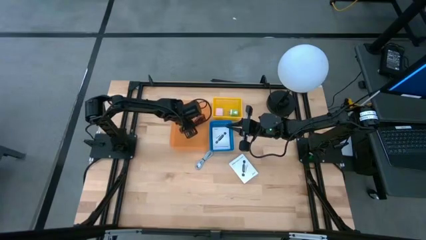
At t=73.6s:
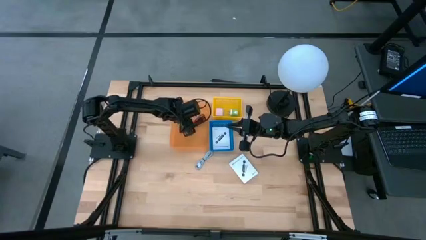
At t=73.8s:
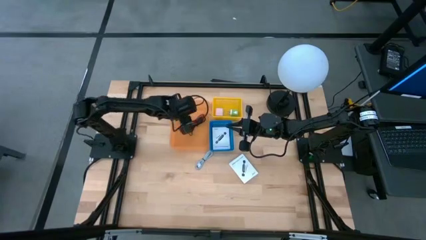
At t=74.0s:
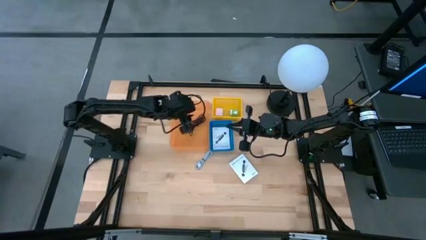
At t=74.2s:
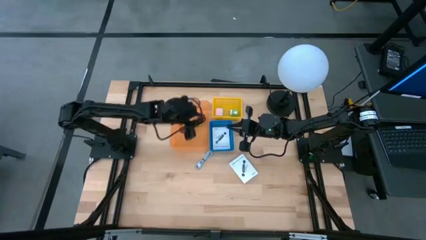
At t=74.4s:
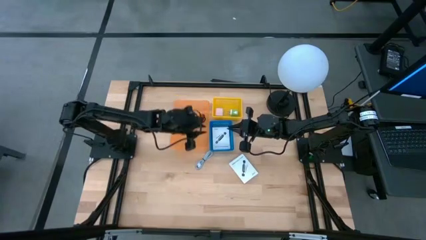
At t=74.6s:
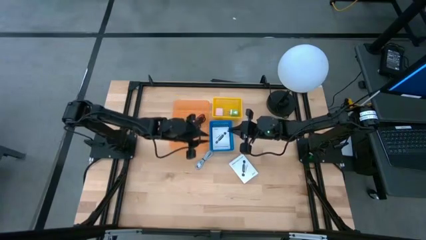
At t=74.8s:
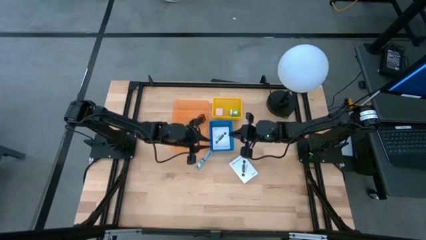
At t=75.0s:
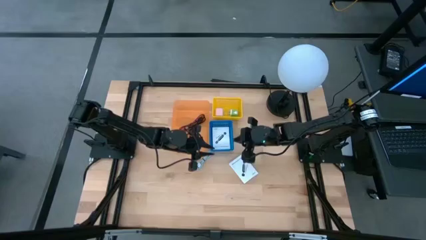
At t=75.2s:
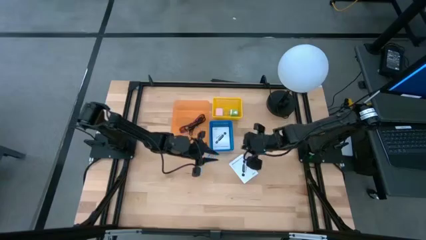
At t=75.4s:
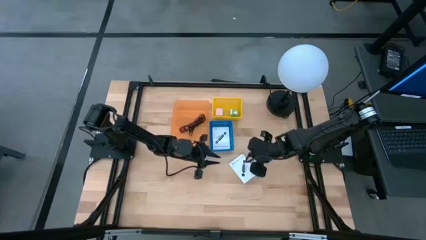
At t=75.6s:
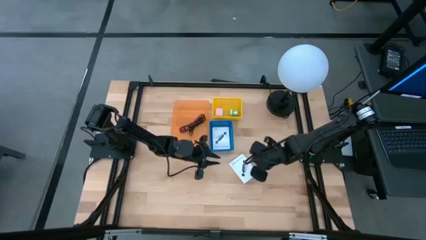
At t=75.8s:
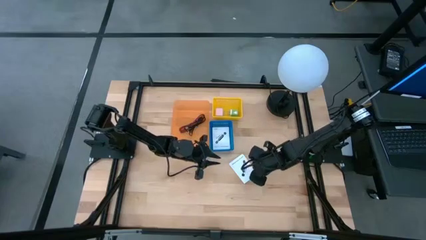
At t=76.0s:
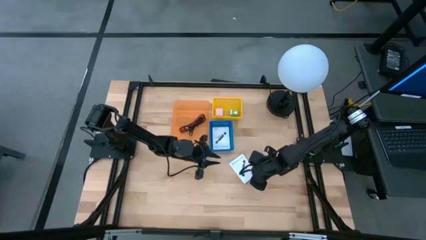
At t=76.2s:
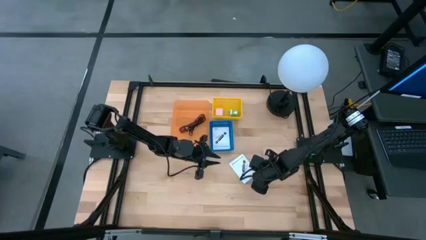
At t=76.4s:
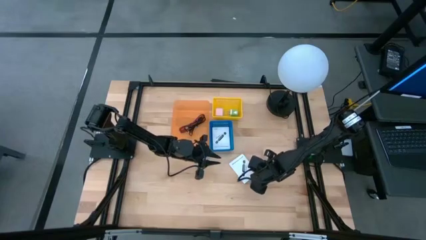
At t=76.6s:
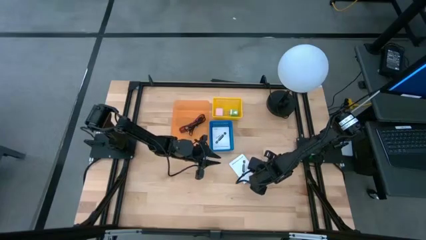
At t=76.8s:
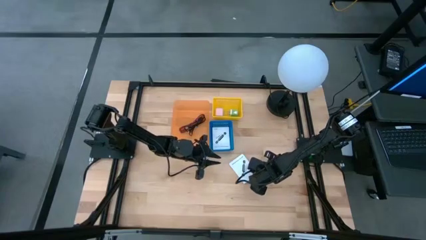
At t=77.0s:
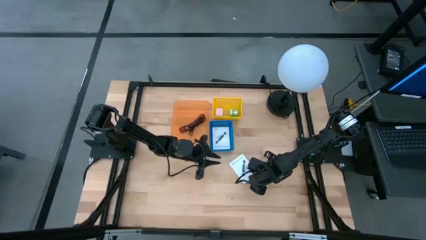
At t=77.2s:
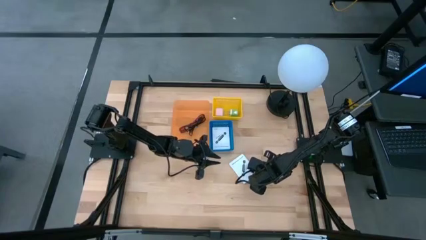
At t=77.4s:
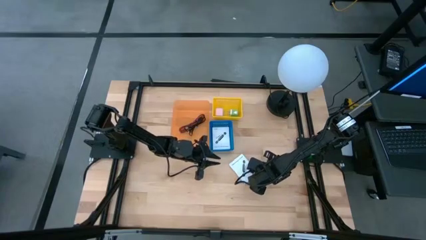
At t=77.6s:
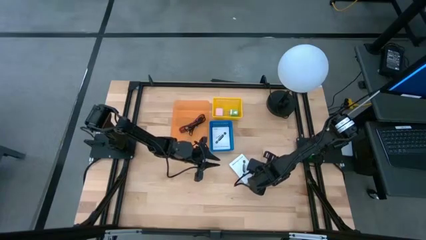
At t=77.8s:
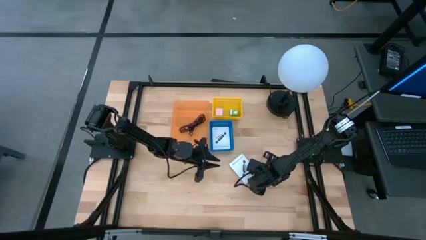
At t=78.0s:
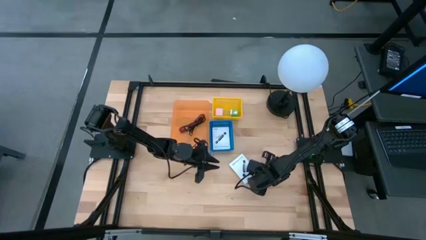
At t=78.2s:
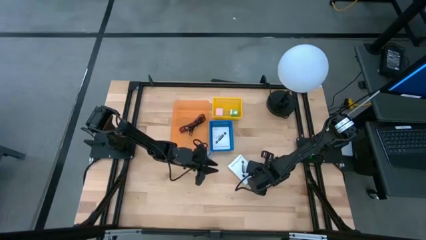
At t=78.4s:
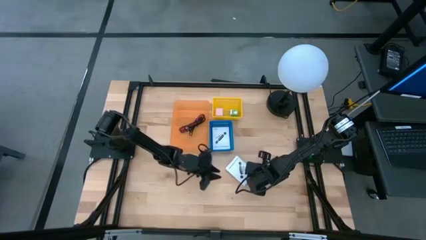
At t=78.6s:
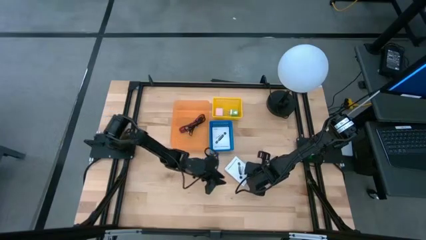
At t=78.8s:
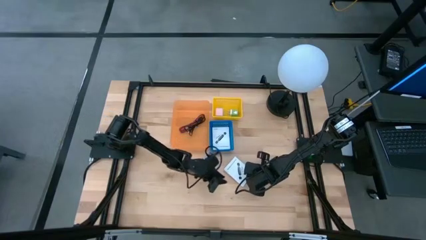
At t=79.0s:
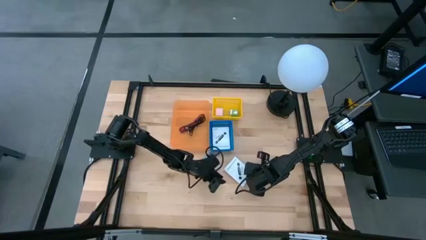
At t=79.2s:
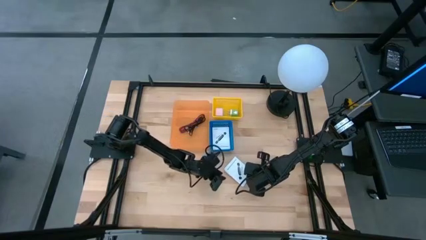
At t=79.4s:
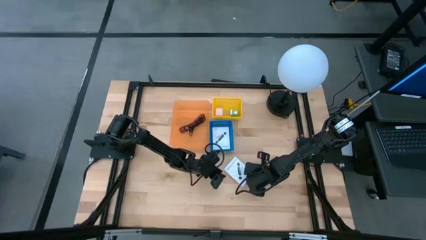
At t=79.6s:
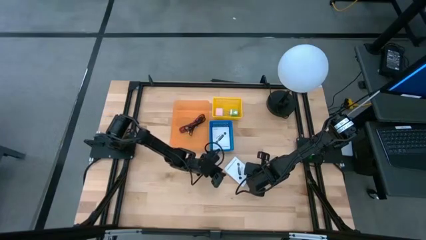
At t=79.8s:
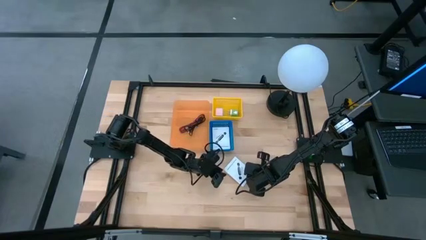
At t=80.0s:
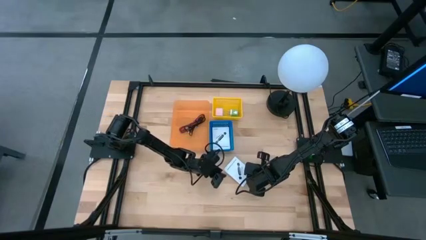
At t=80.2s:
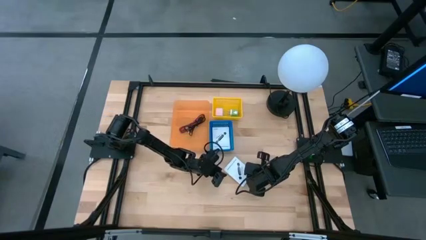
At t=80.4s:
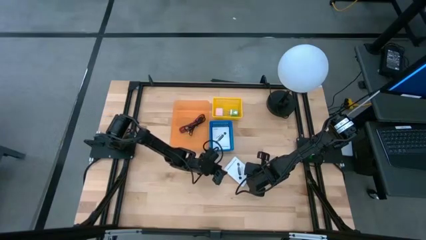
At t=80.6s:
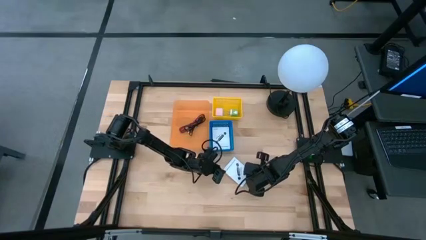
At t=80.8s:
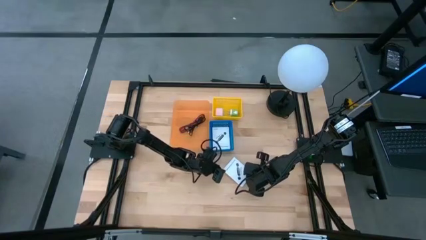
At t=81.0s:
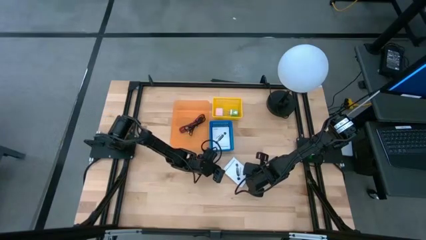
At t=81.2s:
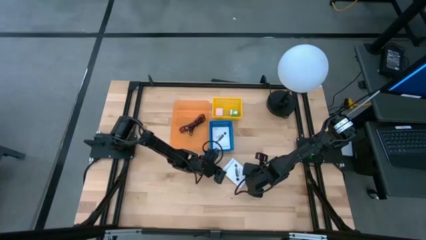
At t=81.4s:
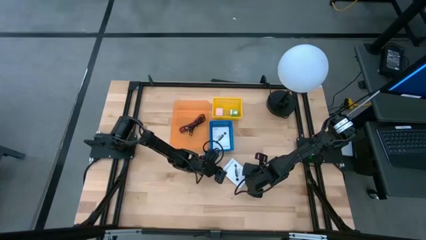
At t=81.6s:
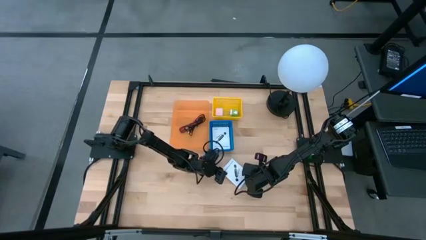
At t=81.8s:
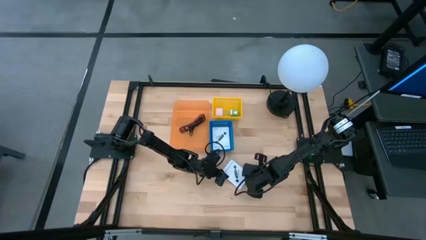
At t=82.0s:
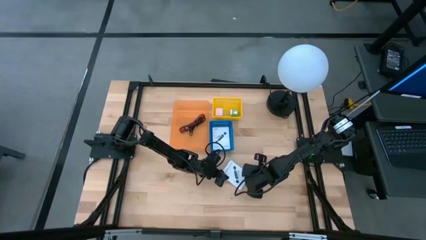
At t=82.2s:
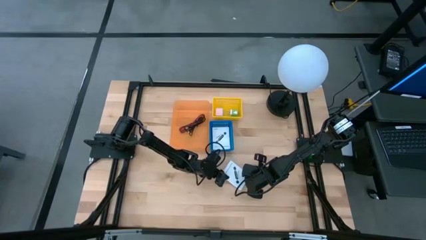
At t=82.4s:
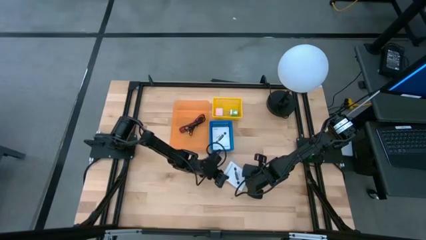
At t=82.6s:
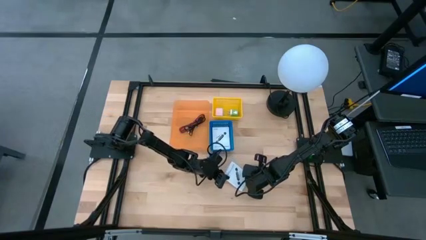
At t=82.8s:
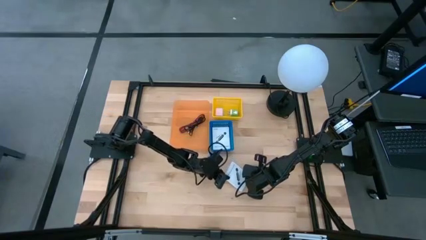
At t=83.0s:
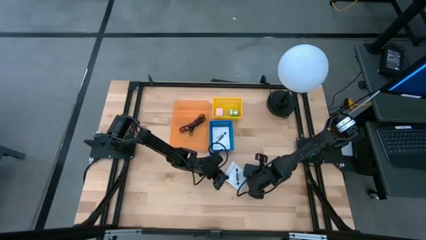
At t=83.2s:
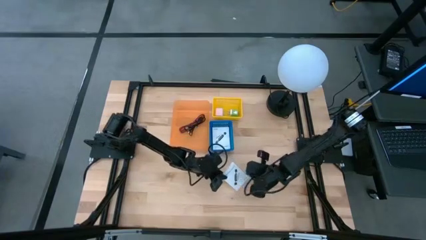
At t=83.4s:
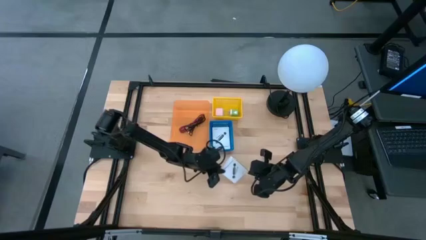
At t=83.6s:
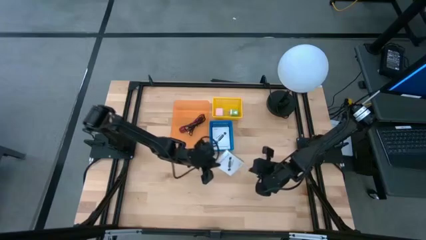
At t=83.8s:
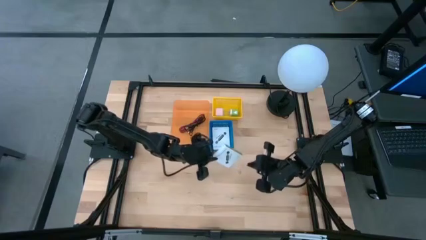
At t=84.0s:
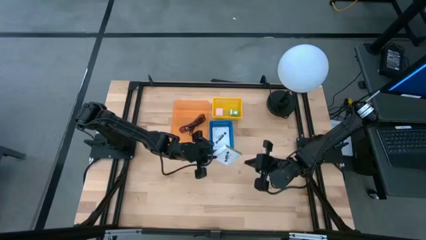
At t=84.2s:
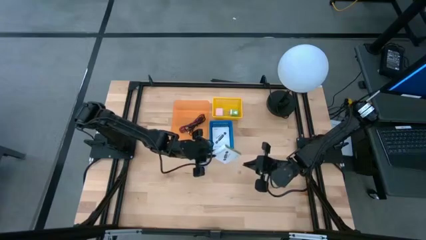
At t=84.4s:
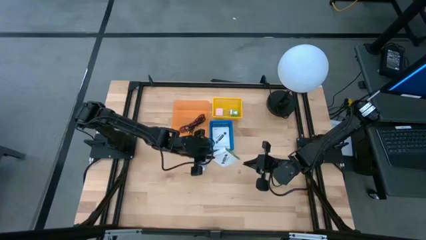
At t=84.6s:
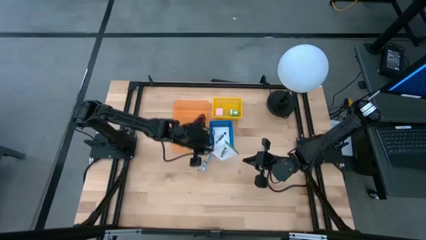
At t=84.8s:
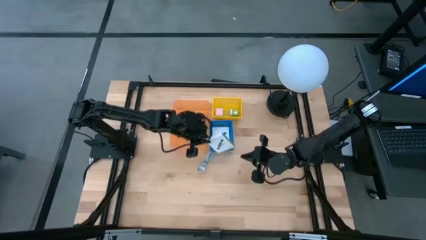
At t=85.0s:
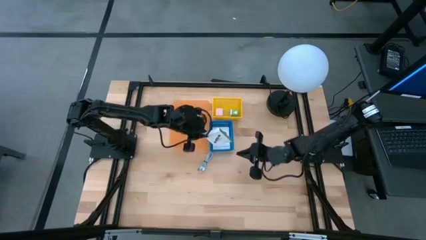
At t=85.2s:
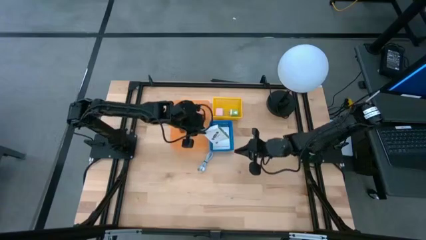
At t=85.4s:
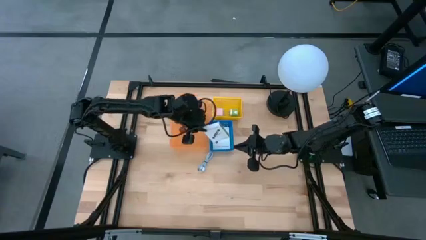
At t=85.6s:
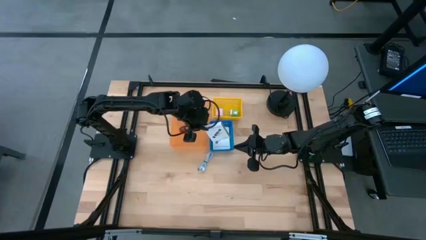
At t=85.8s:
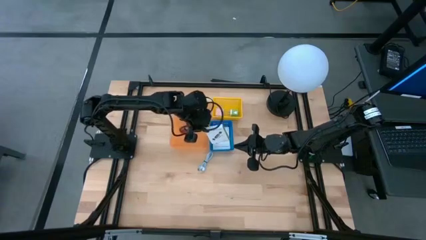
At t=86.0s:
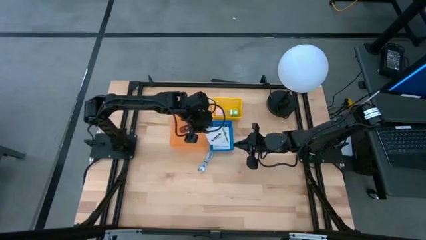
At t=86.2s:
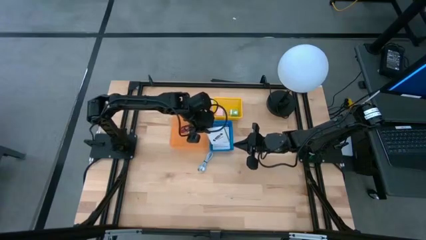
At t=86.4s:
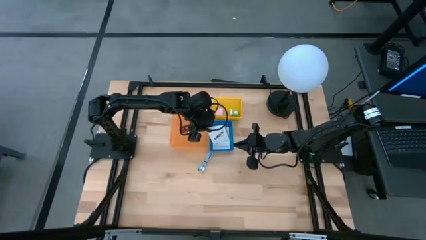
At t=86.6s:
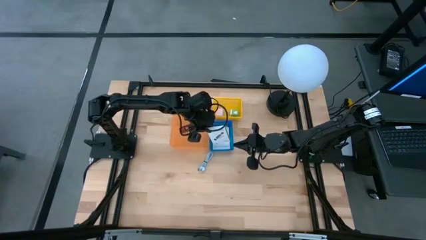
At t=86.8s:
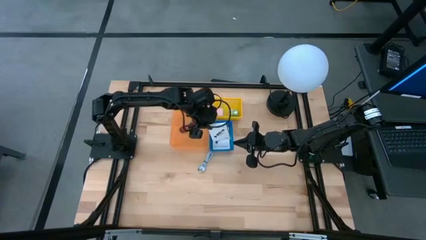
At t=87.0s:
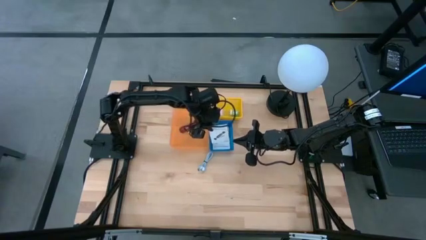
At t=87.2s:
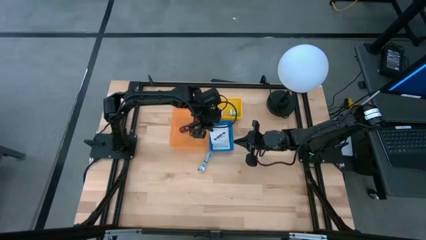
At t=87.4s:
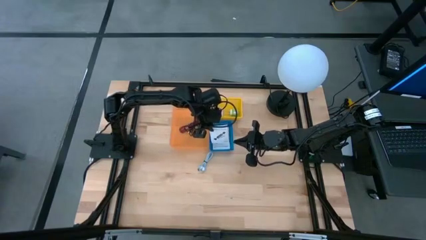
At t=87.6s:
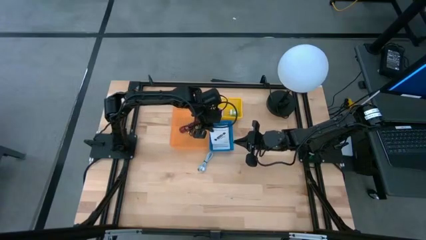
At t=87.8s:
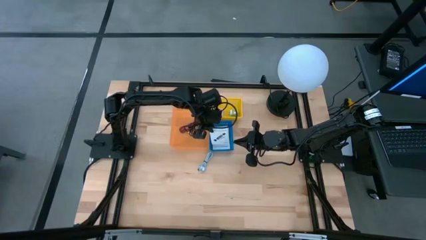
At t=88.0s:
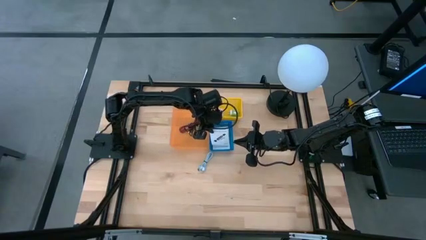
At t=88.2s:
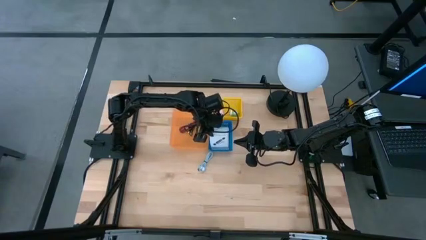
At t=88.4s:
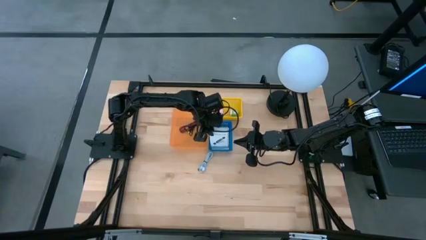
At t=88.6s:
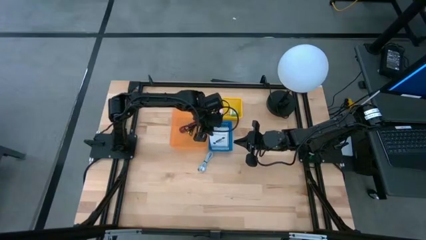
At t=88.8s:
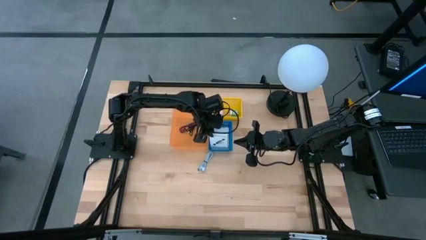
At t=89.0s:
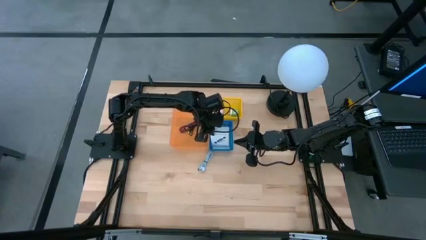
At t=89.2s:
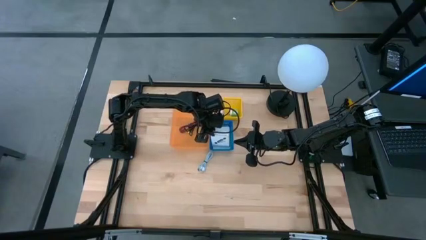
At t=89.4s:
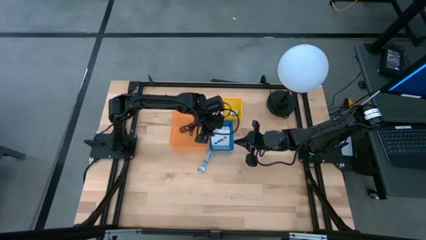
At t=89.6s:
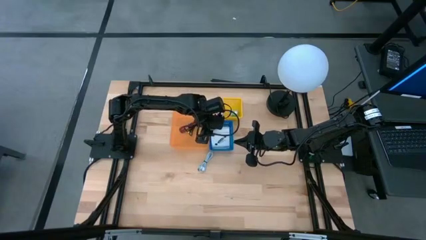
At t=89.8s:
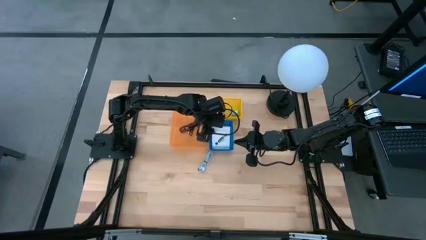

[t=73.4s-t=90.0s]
Task: Pick and place items into bin
Put the card reader box into the blue bin
